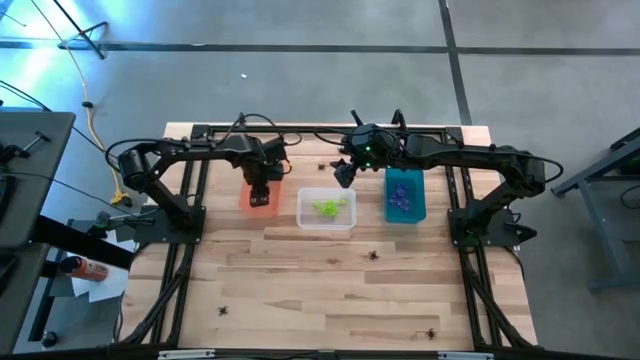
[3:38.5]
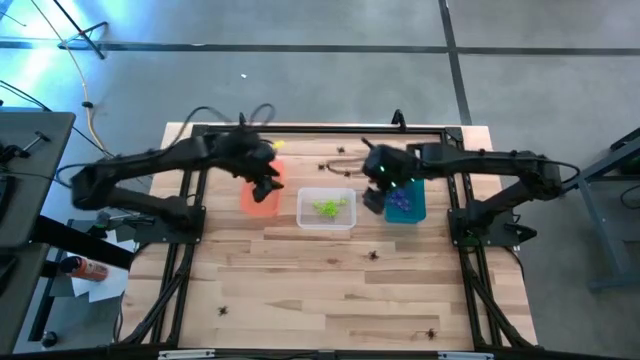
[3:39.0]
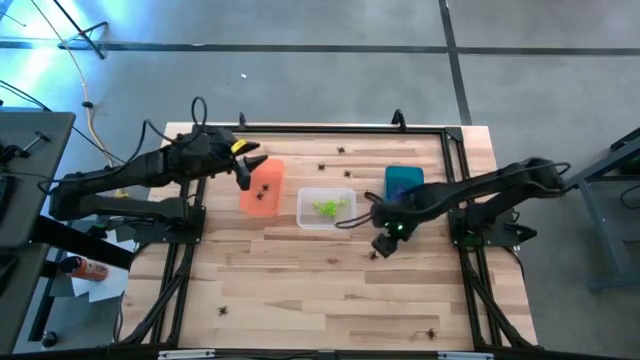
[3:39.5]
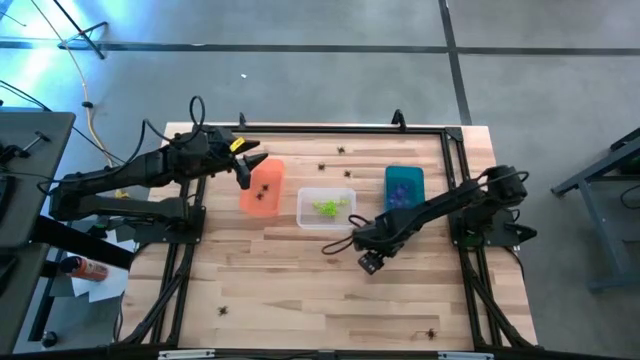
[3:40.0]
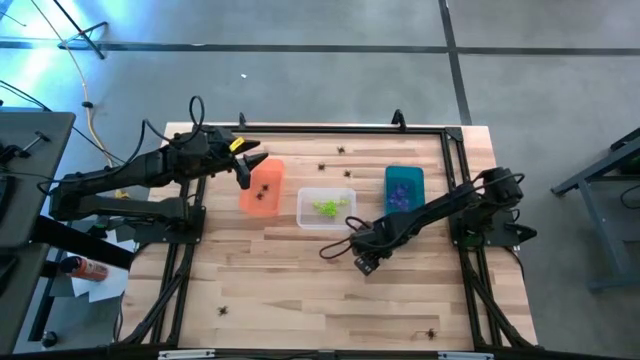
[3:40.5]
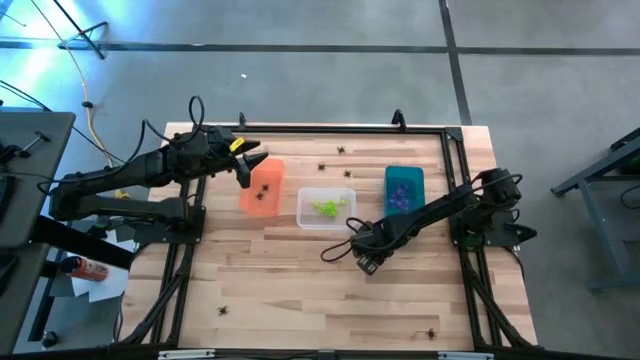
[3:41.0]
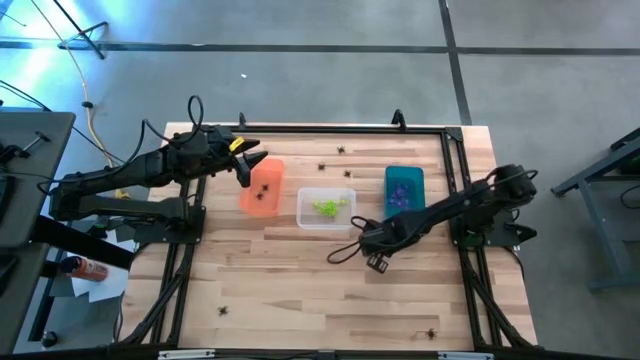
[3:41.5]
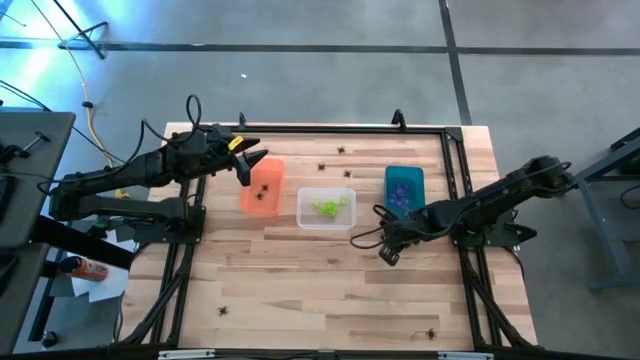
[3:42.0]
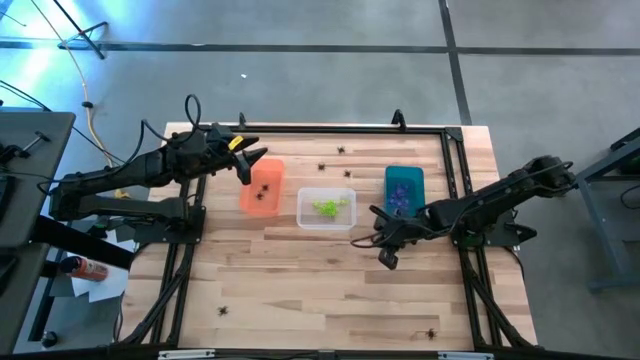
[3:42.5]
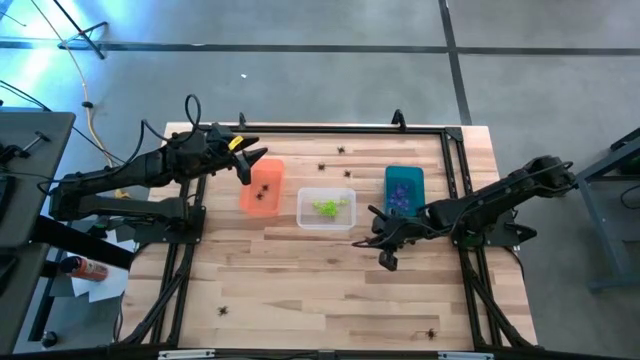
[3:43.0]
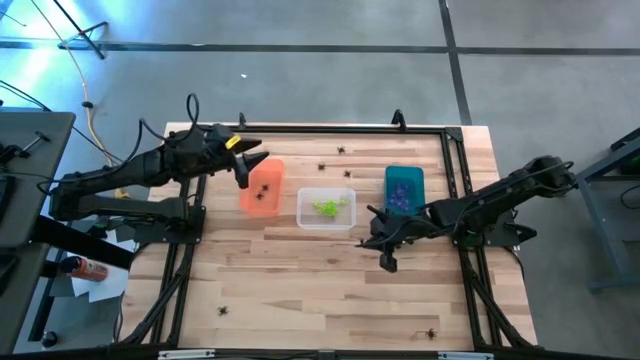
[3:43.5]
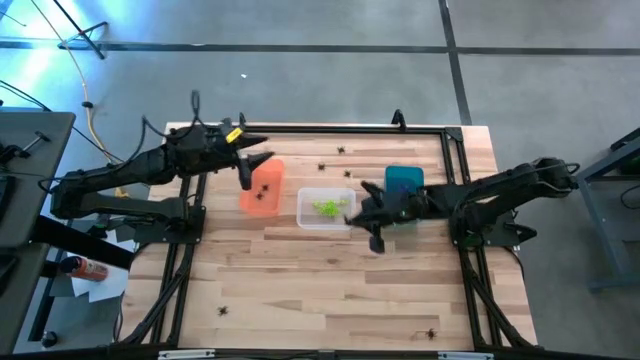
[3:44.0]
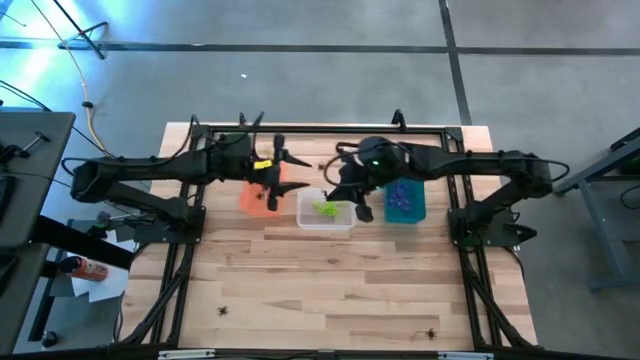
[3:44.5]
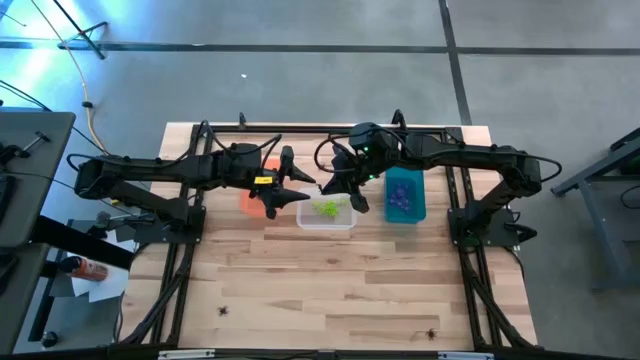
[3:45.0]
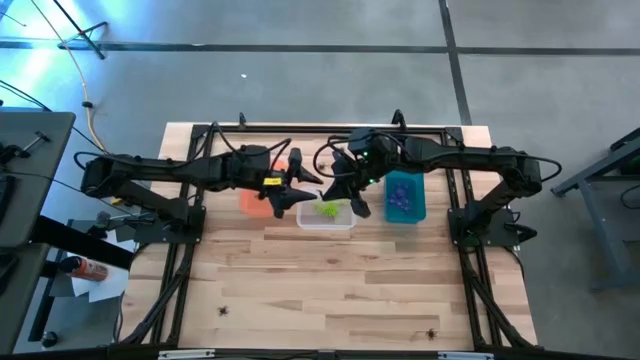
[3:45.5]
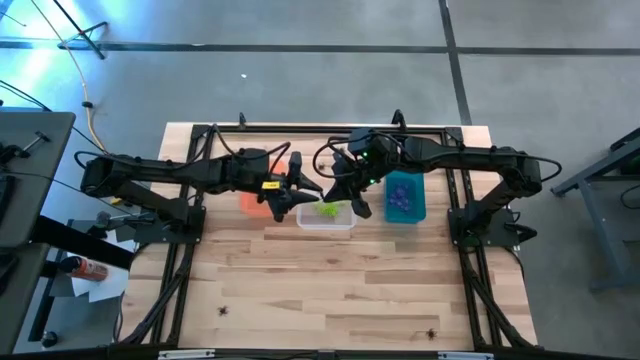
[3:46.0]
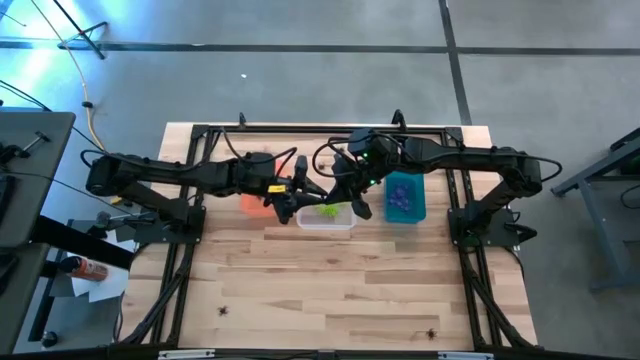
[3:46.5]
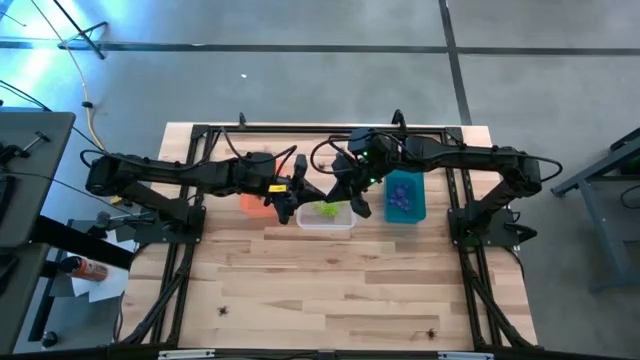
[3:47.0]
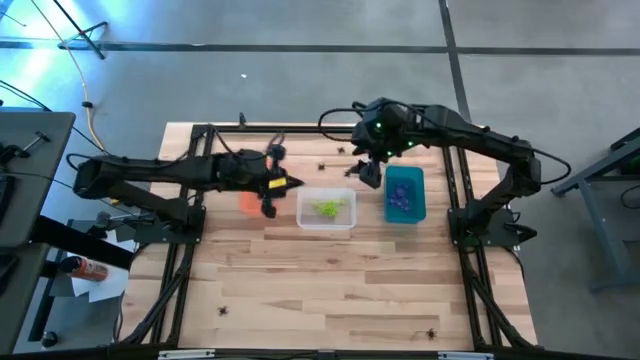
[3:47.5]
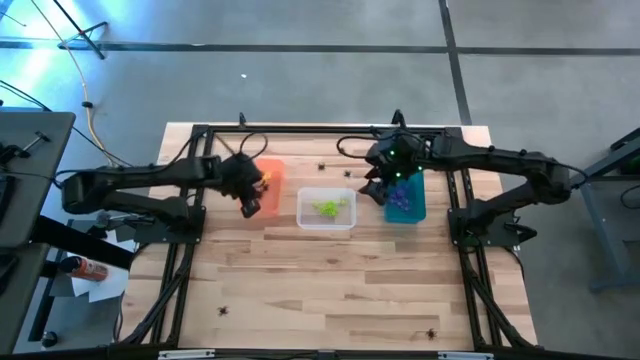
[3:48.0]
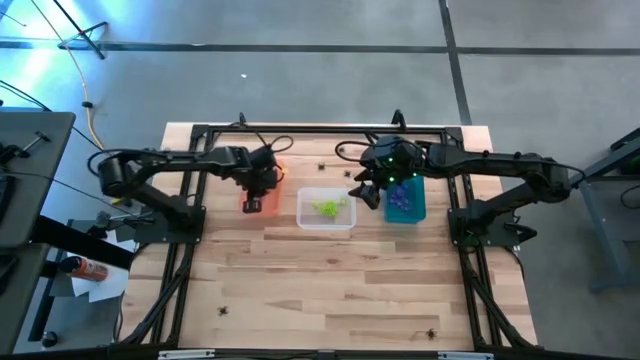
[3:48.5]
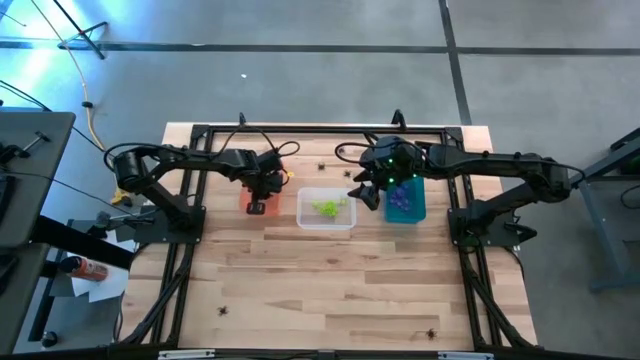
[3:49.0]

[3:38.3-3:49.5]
Task: Sort Halloween decoration
Put the black spider toy into the orange bin

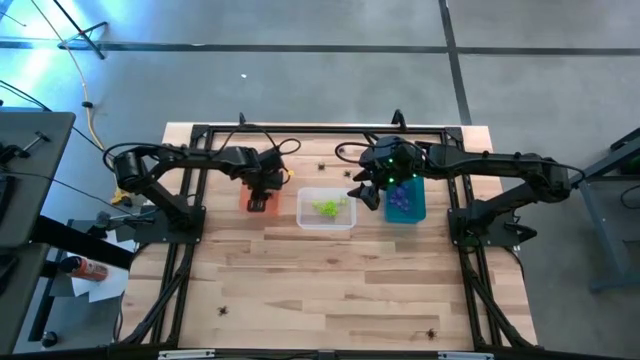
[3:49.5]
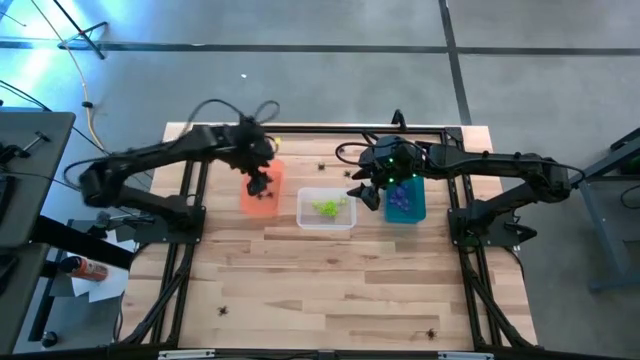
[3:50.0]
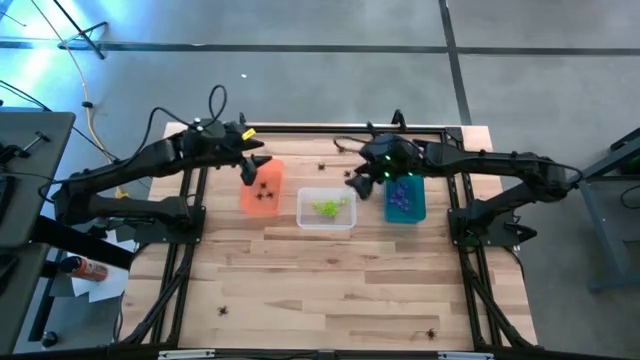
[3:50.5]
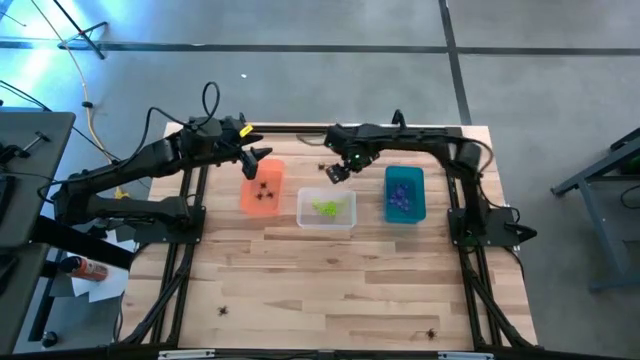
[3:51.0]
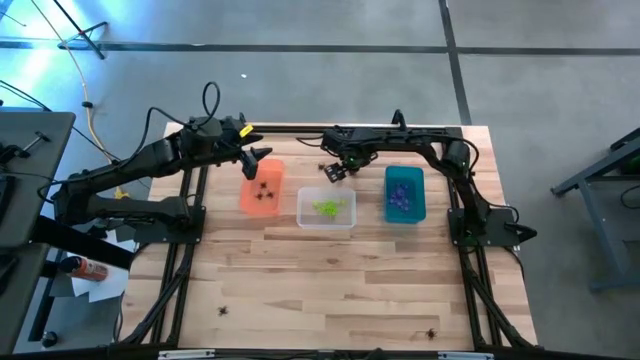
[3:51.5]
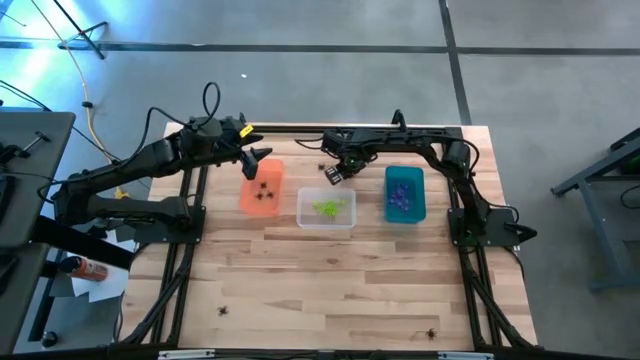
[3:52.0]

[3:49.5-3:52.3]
Put the black spider toy into the orange bin

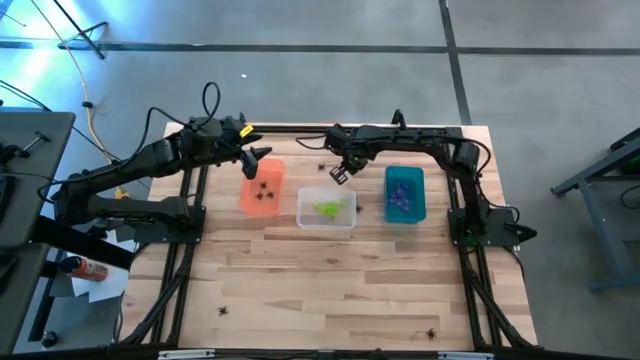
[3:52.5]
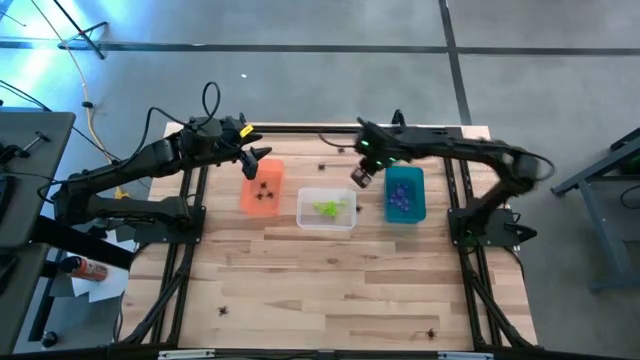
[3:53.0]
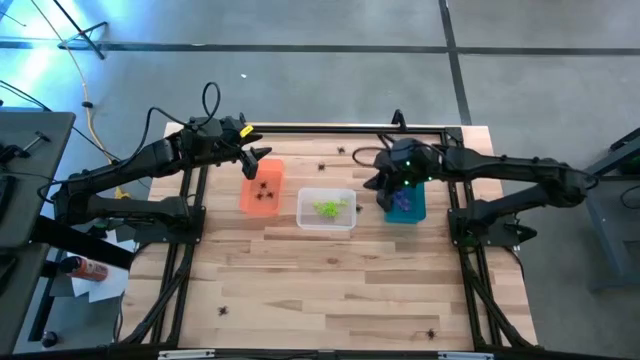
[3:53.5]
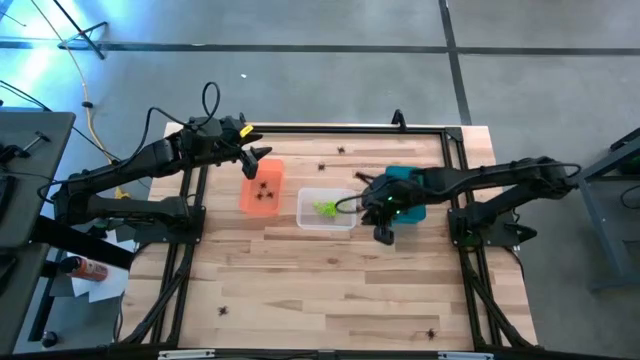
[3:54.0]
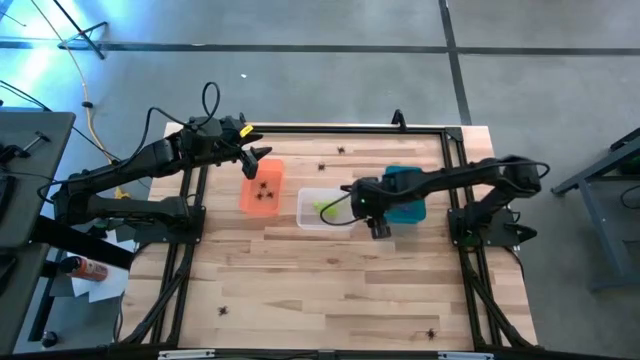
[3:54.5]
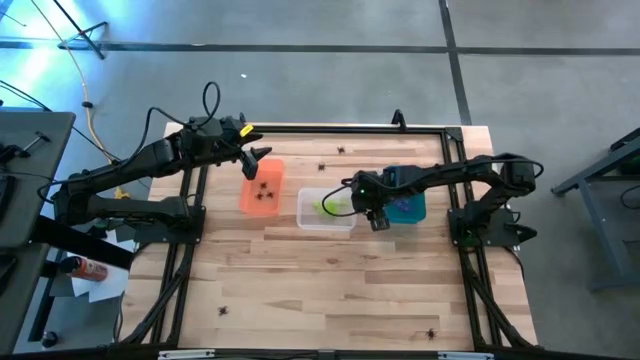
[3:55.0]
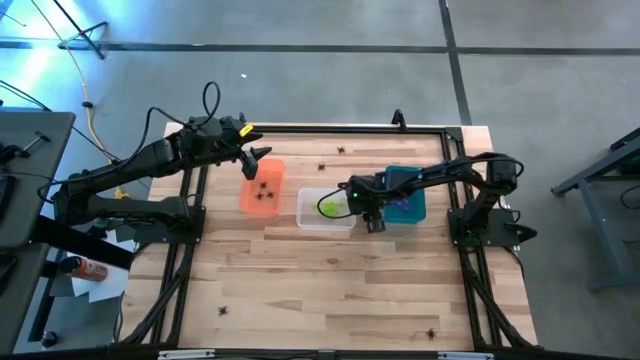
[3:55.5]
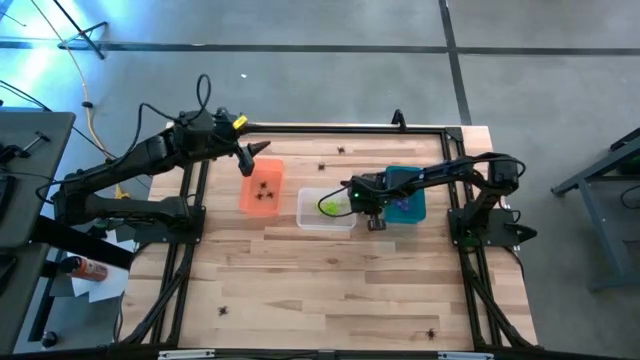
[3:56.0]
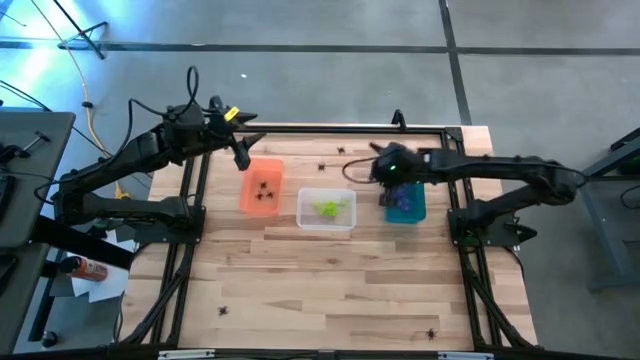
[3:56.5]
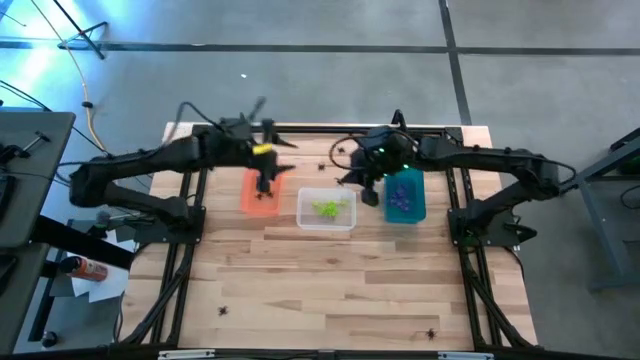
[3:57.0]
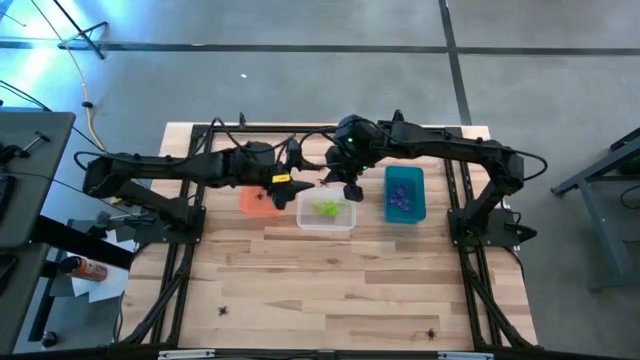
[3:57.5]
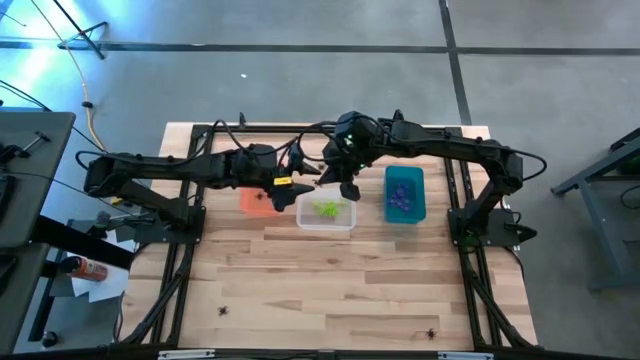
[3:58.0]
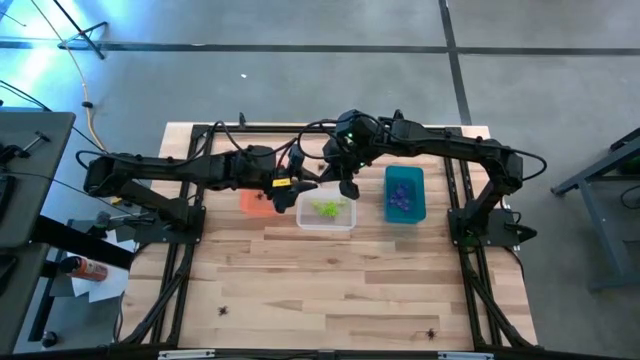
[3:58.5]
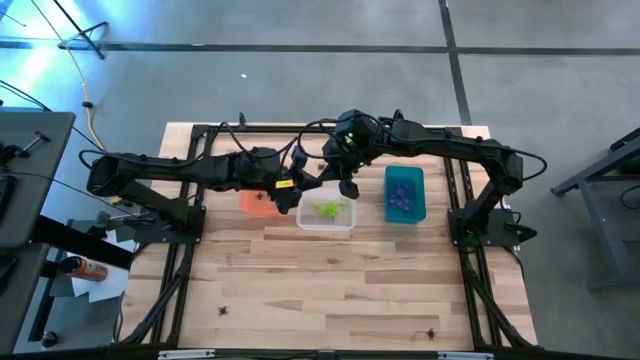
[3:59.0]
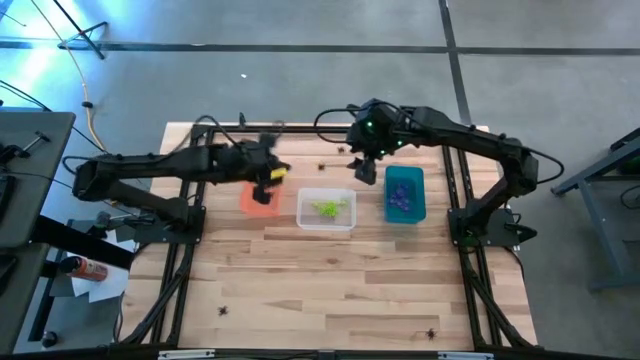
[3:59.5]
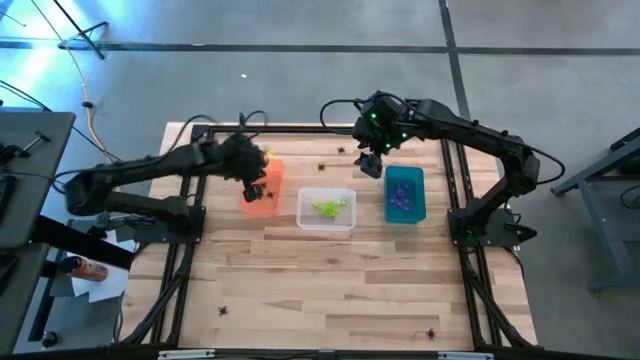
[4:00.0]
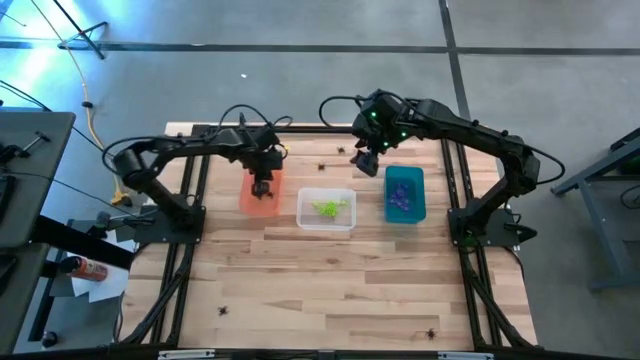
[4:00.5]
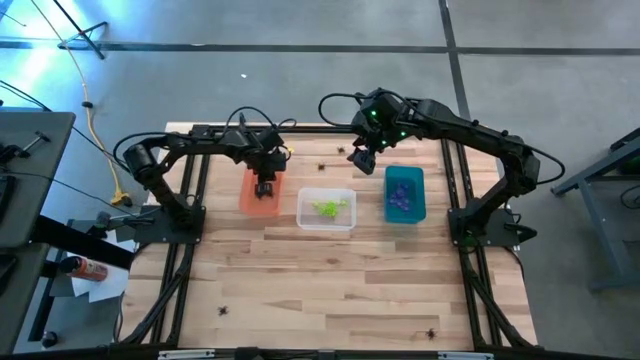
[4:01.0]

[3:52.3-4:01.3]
Put the black spider toy into the orange bin
